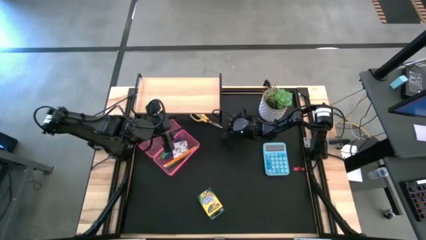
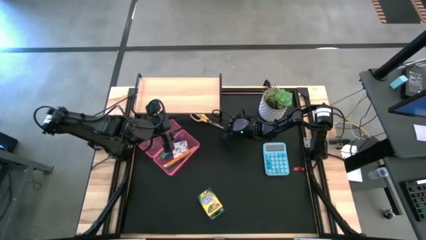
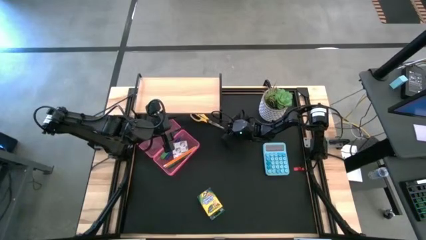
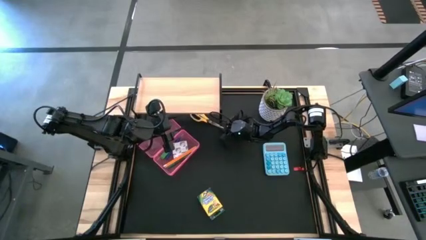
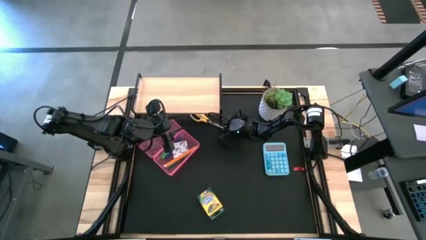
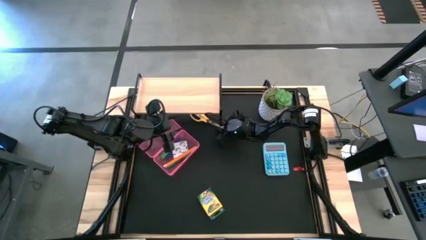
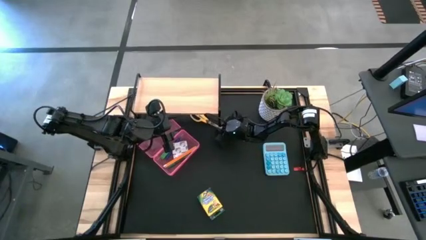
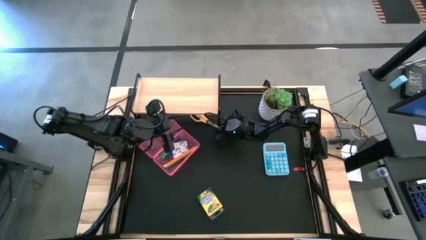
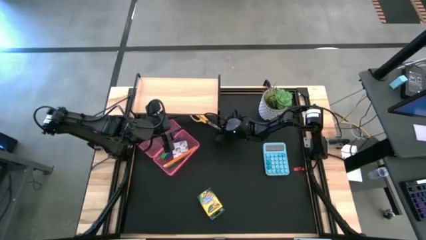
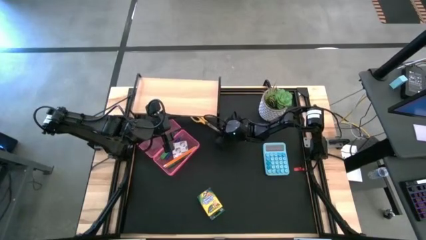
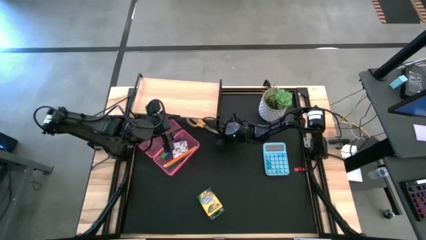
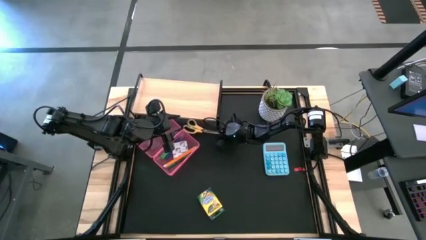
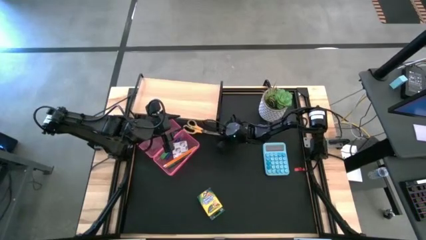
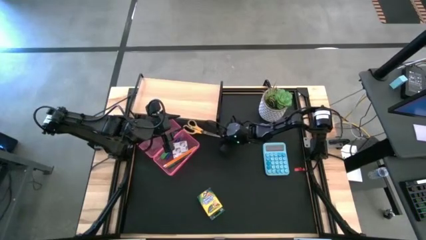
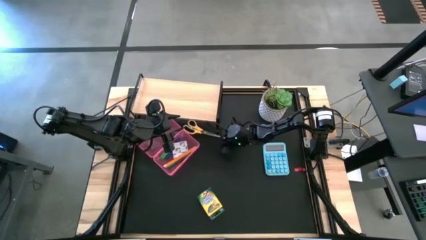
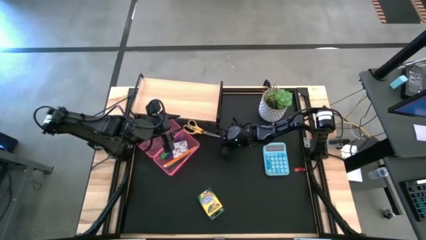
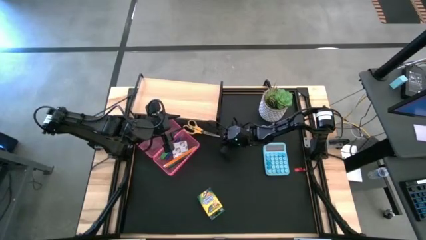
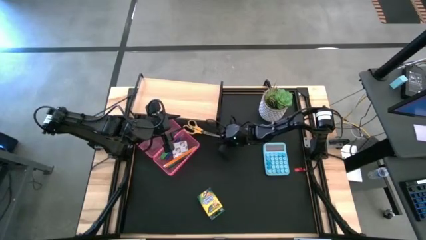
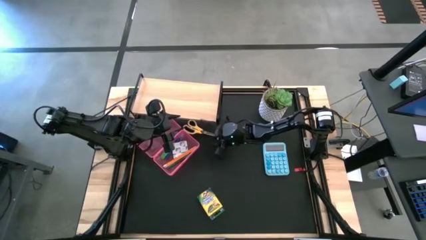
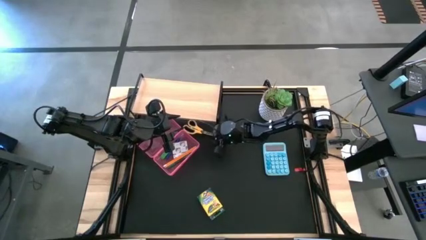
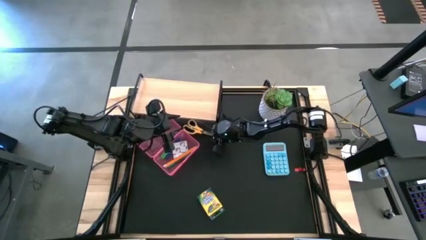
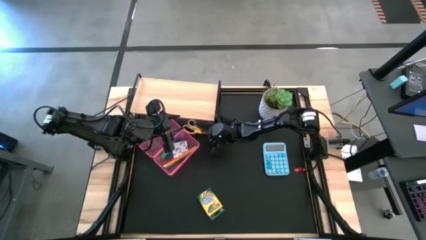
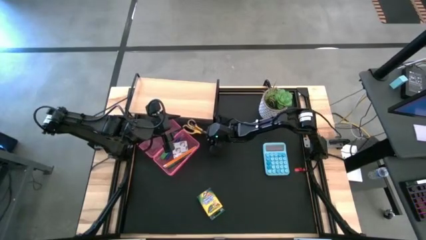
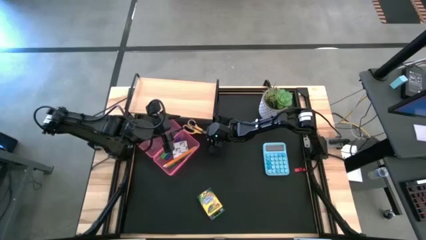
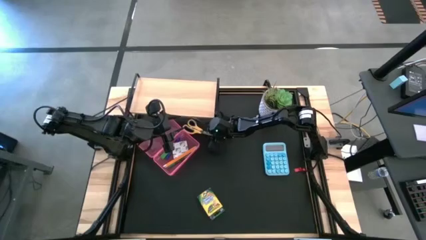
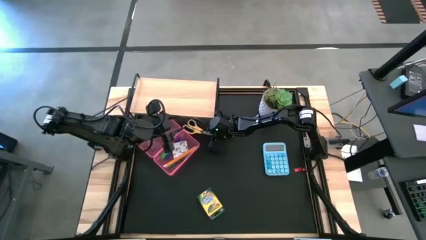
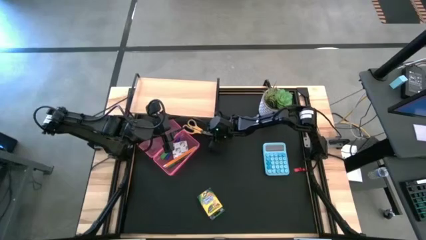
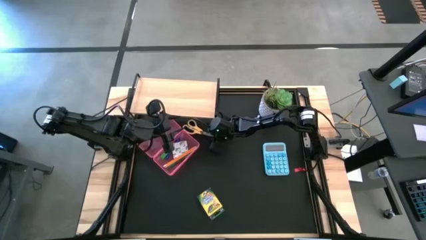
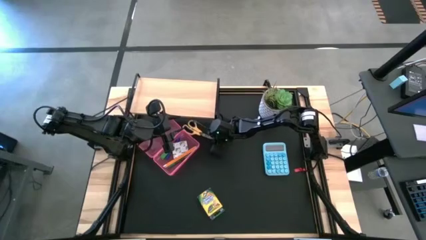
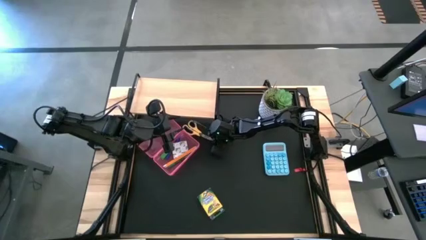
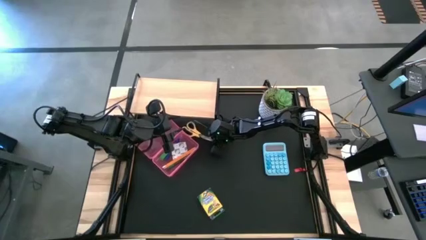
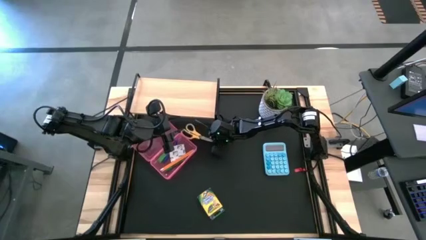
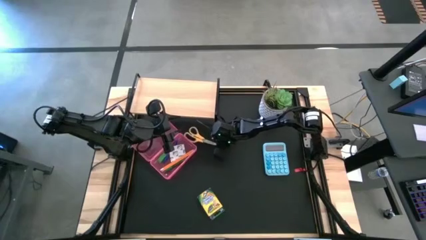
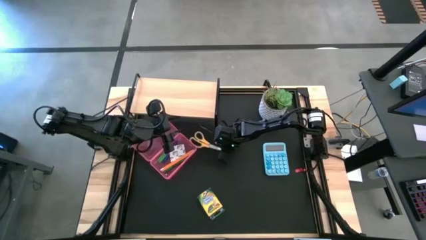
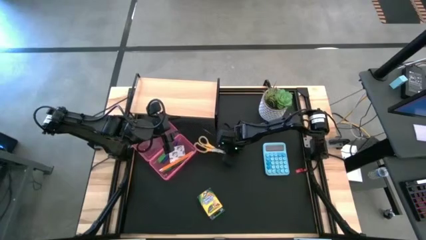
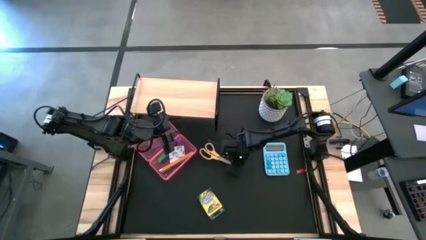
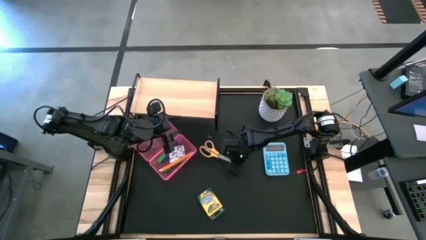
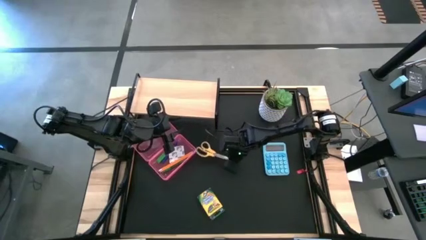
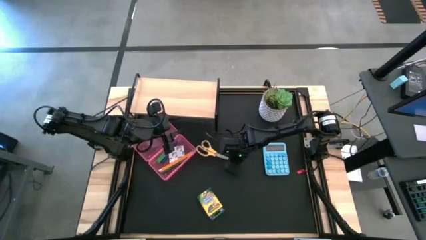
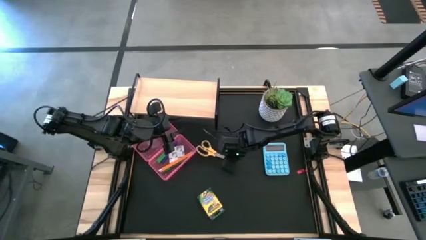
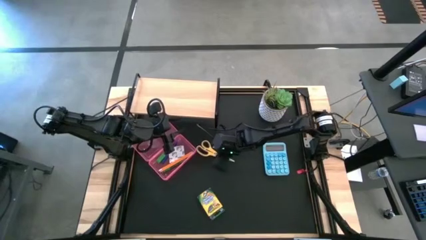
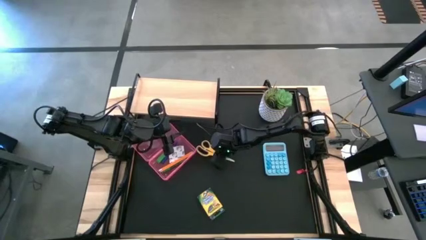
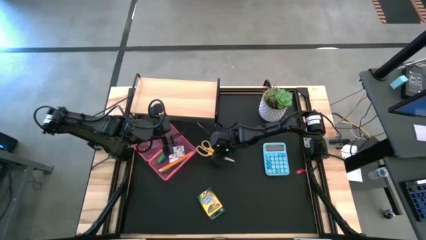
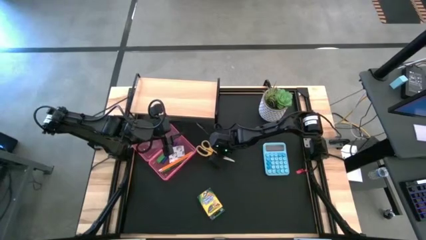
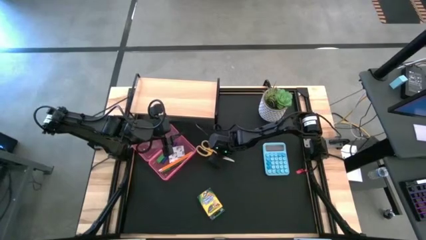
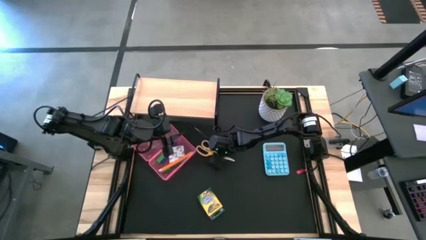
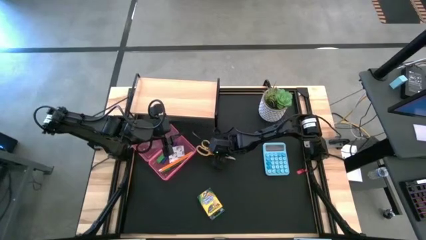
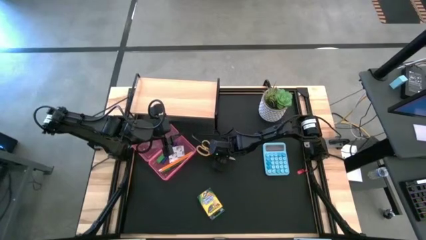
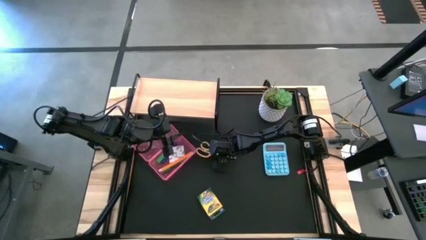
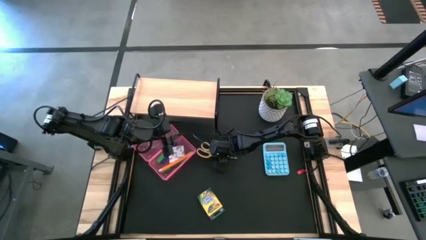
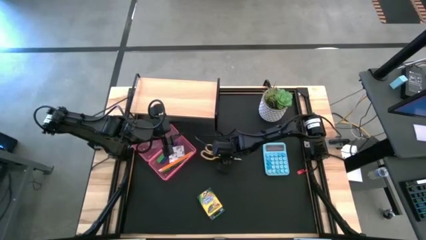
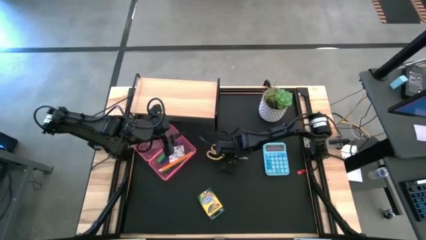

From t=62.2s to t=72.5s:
Task: Pack school essentials
Put the scissor into the pencil box

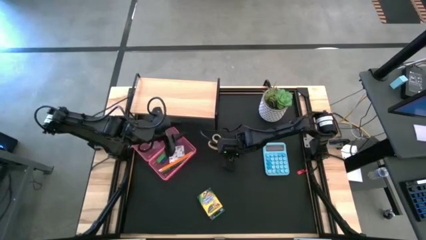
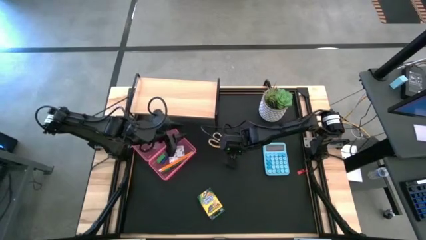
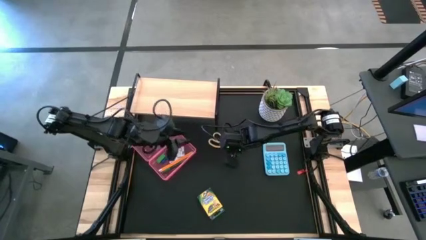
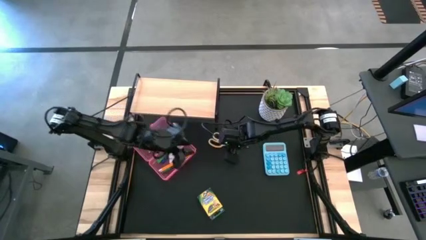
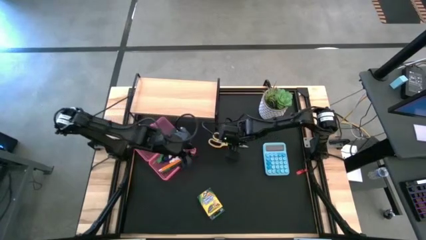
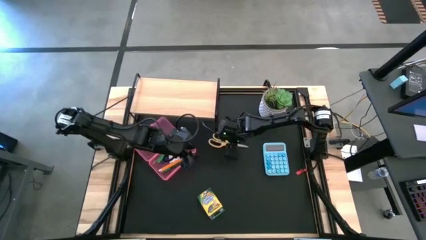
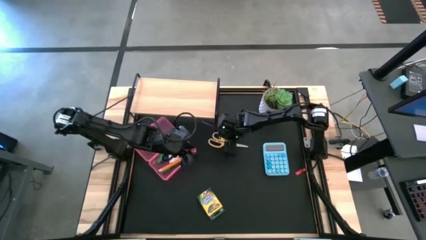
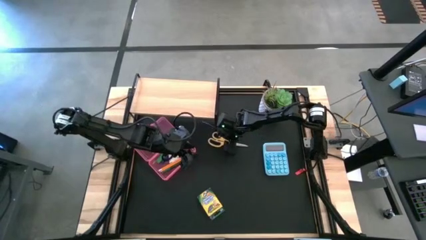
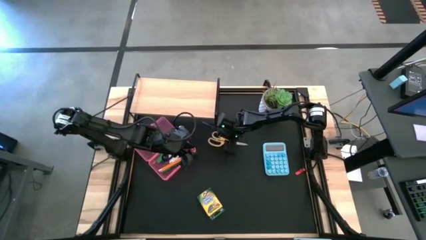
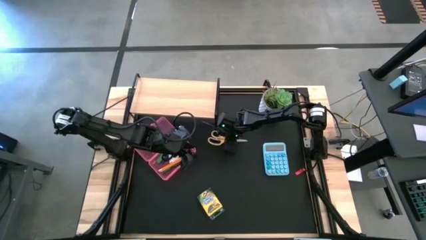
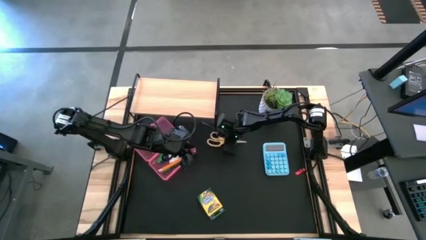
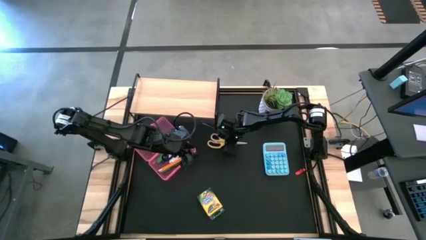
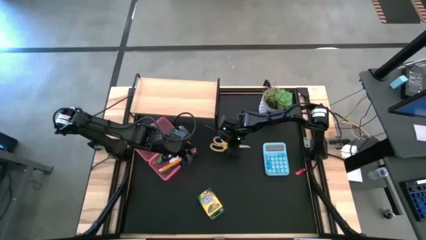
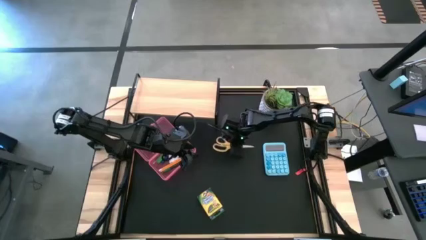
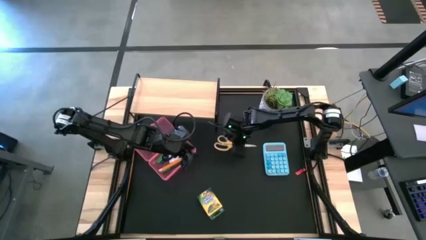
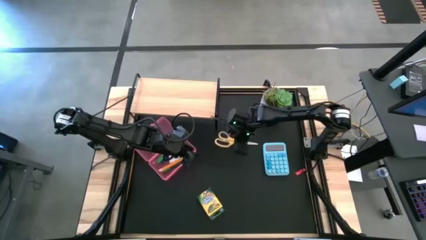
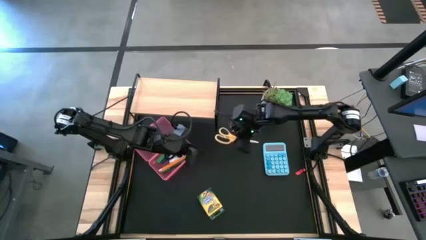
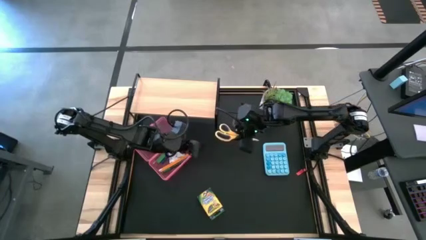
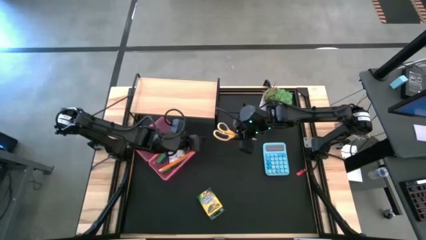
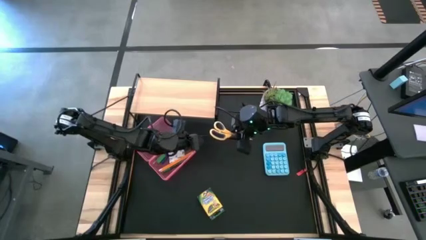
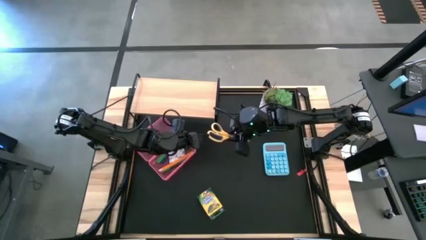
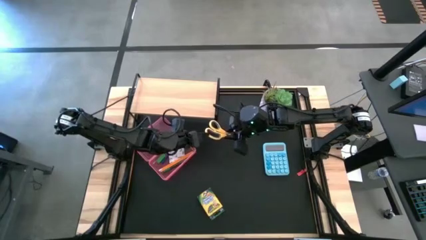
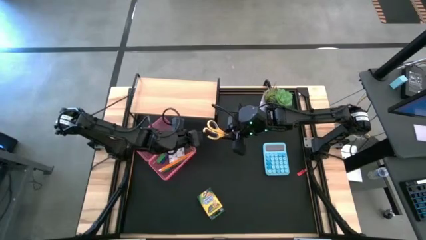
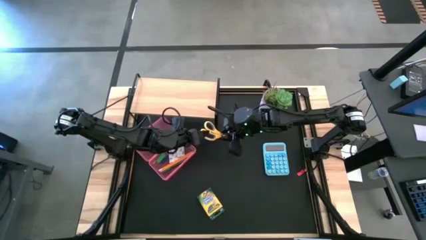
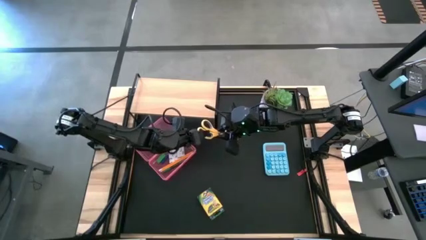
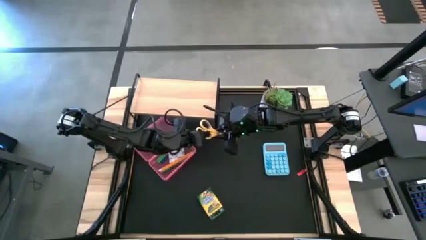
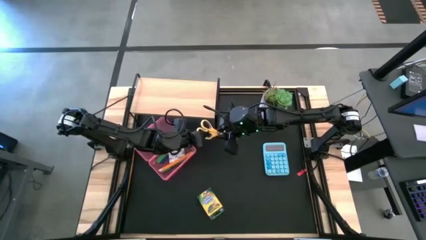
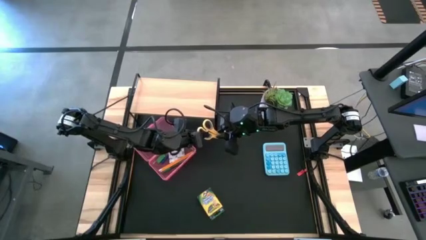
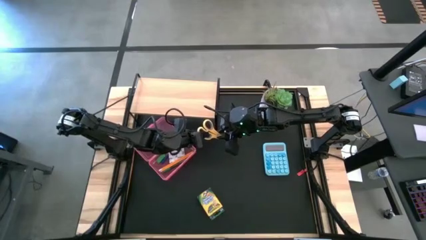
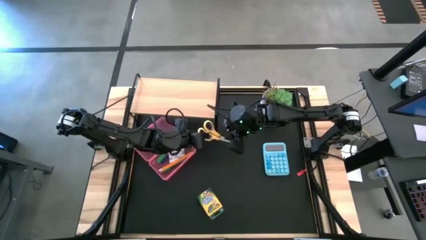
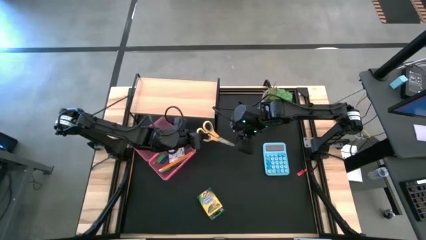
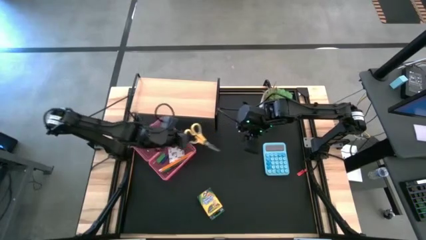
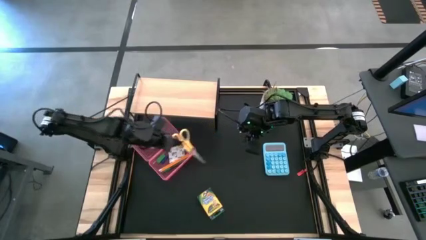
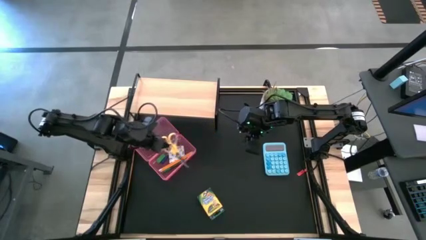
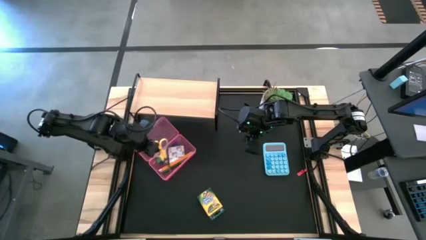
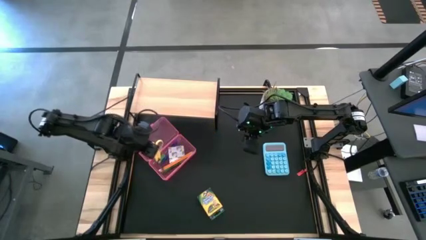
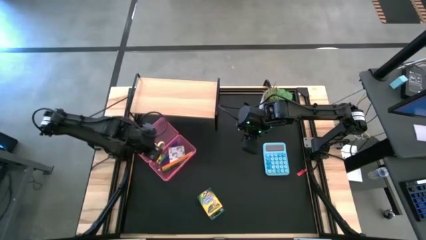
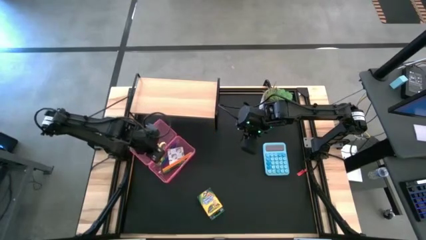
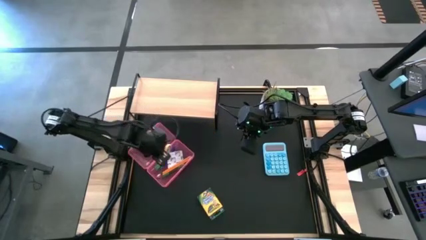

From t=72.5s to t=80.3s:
Put the scissor into the pencil box
